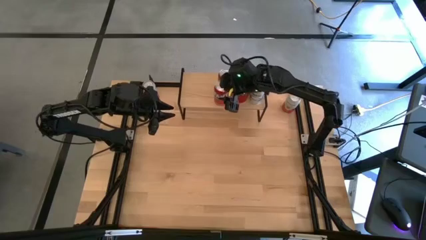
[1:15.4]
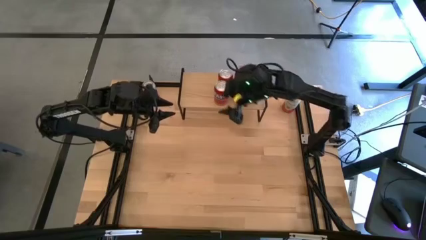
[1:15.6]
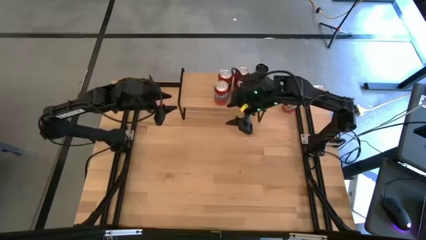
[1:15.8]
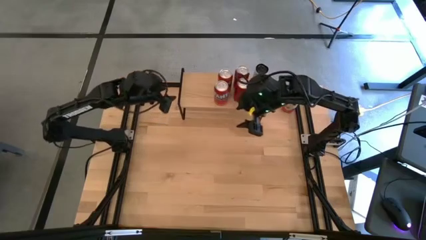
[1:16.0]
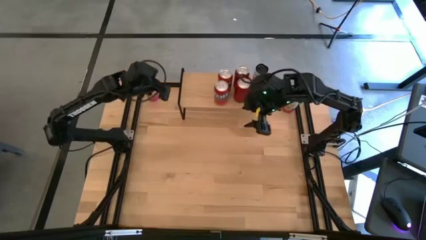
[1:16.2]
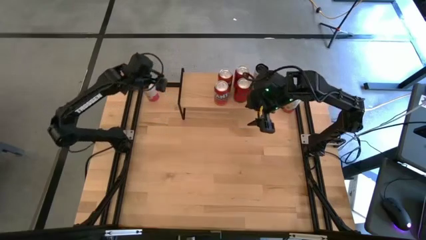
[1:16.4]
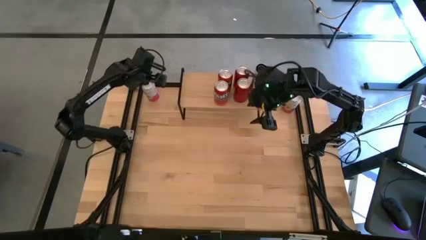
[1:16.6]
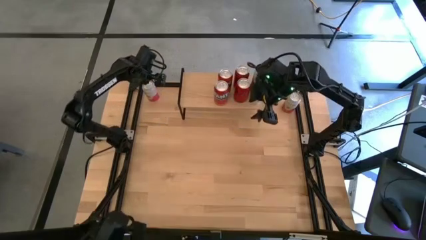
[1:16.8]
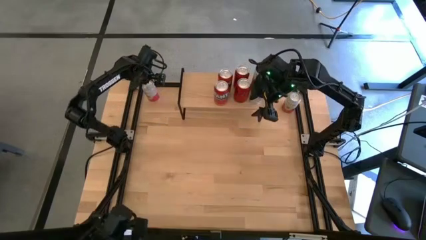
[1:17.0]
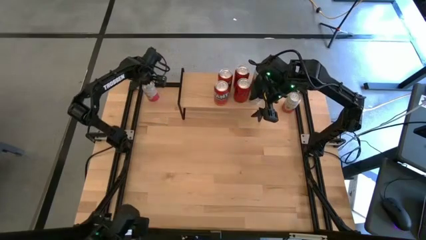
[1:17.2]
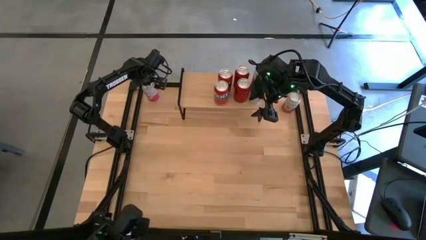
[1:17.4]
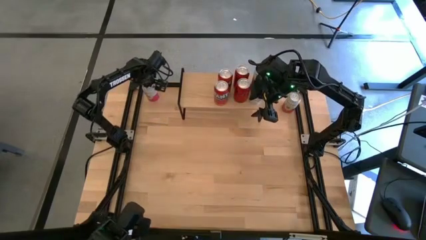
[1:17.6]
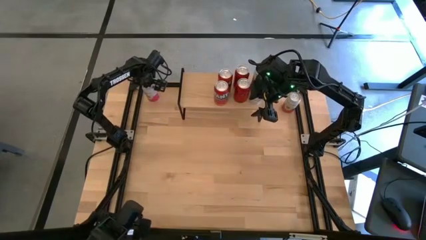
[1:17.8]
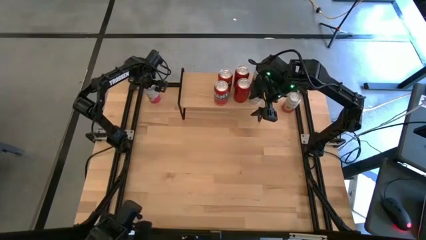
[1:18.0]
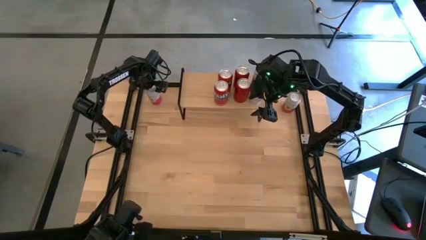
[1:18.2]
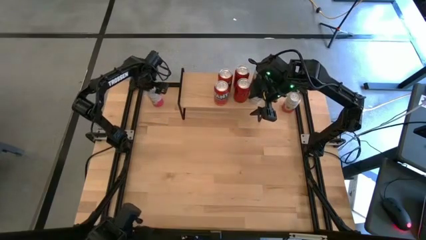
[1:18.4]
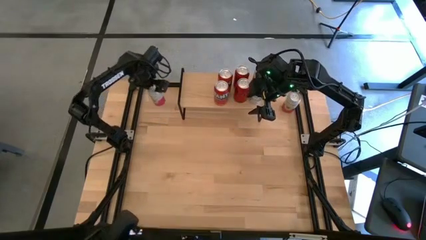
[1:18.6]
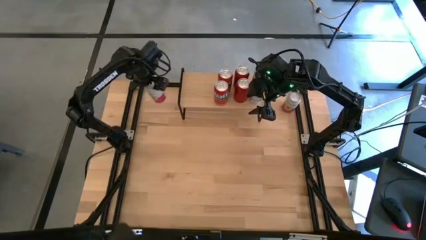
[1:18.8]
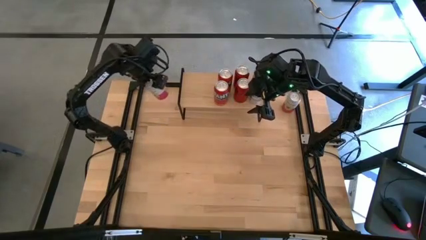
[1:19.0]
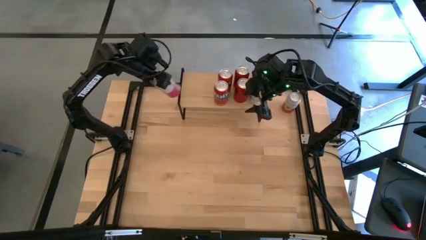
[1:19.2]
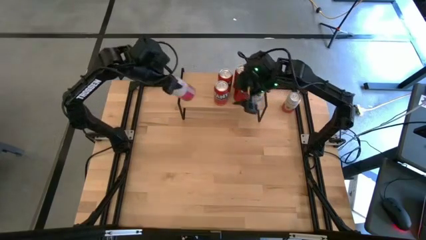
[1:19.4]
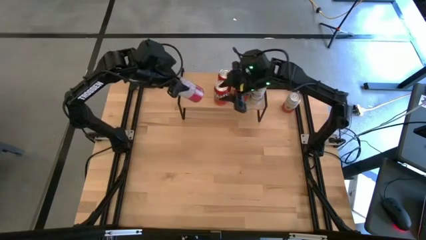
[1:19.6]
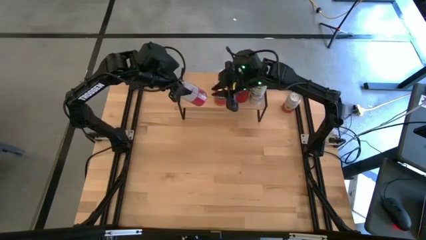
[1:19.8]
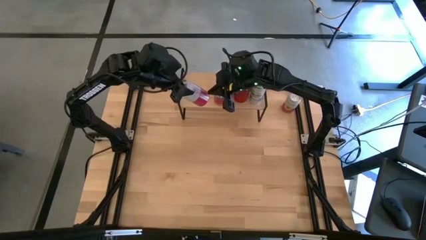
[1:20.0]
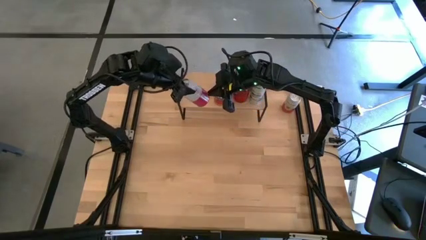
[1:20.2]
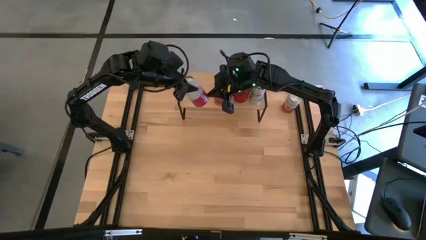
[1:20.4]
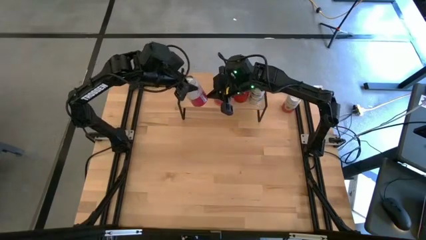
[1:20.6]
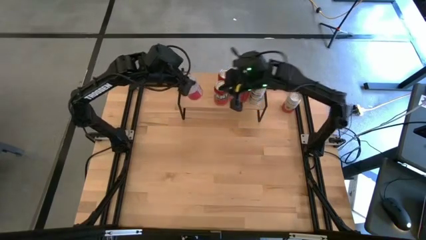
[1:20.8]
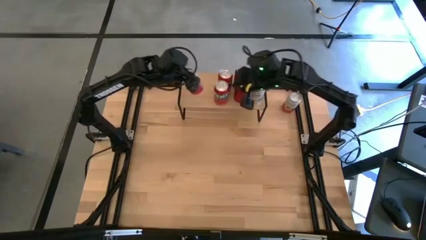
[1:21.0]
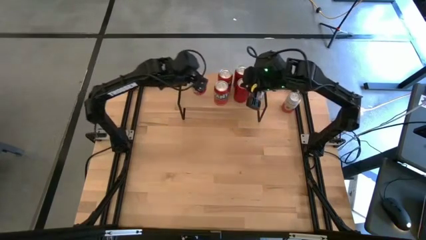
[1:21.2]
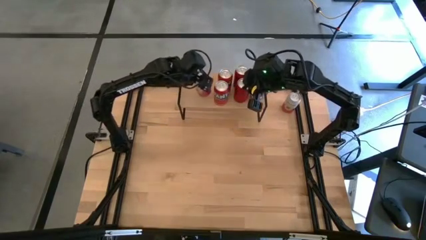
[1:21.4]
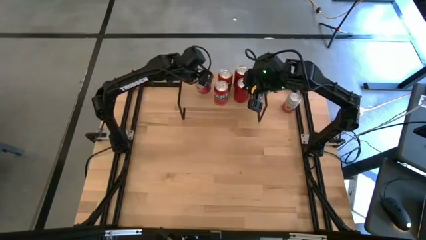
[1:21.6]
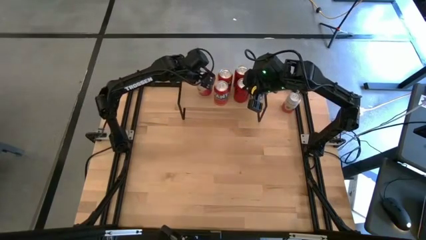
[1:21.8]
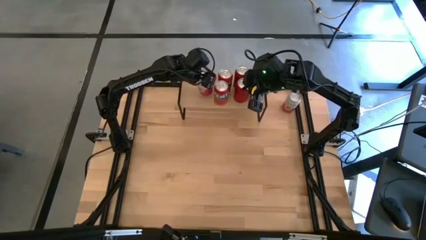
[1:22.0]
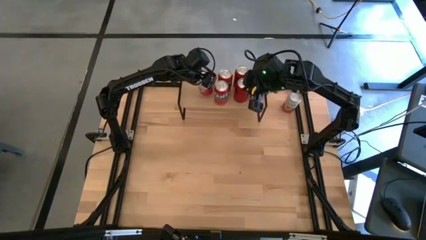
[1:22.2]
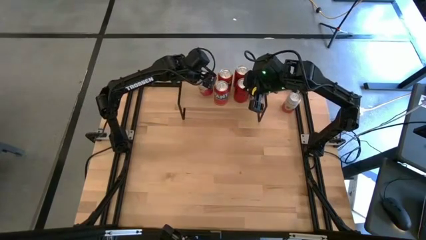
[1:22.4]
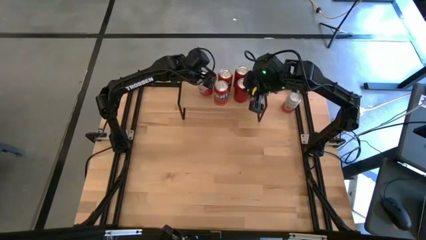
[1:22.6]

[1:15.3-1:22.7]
Task: Place canned beverage on shelf
Put the left pink-white soda can on the shelf

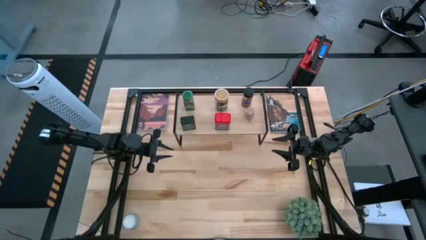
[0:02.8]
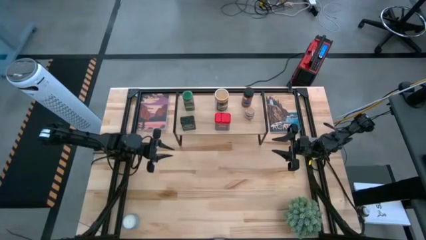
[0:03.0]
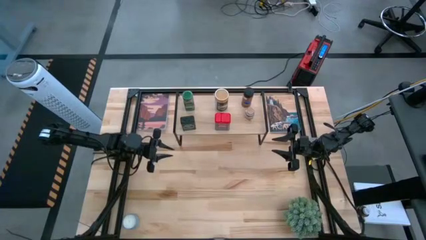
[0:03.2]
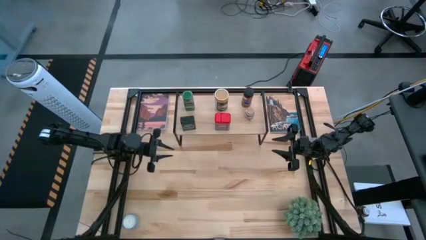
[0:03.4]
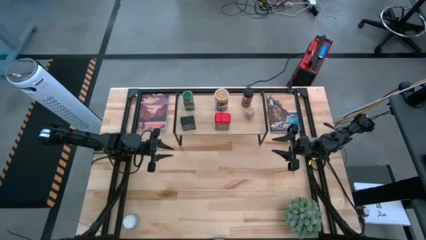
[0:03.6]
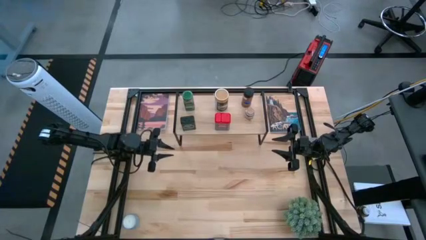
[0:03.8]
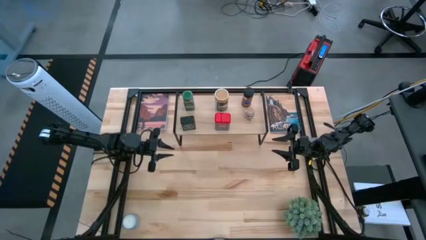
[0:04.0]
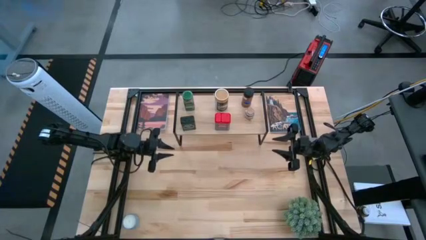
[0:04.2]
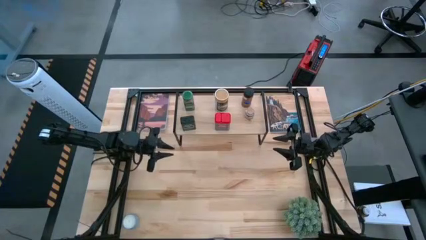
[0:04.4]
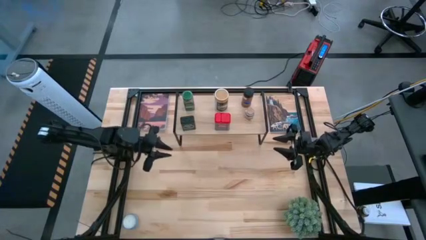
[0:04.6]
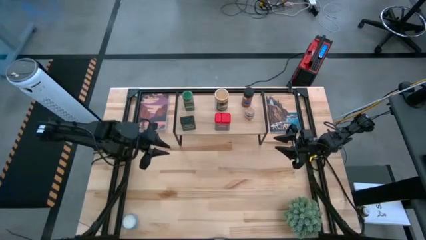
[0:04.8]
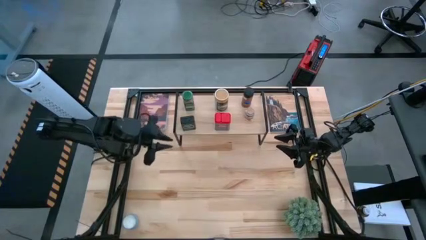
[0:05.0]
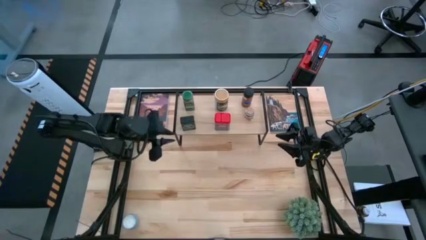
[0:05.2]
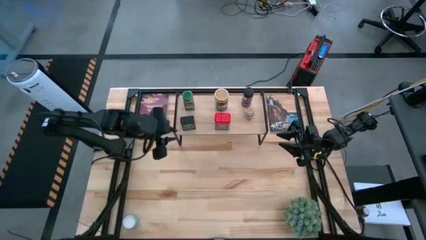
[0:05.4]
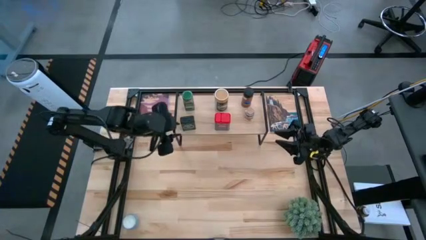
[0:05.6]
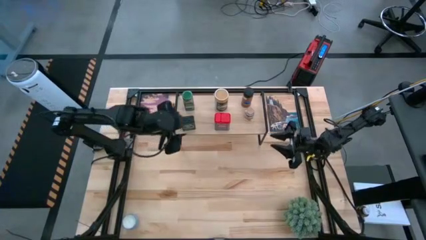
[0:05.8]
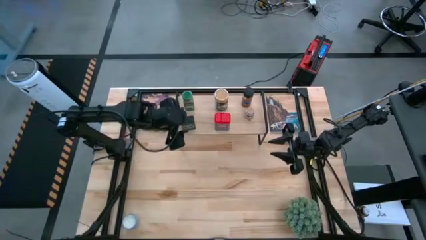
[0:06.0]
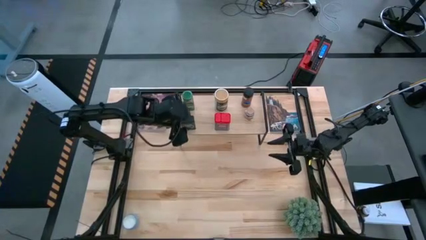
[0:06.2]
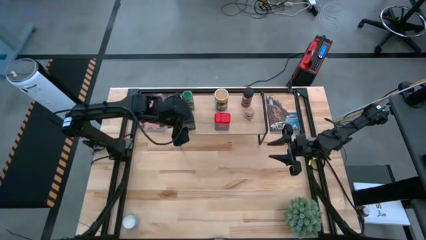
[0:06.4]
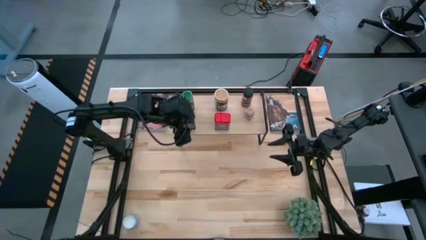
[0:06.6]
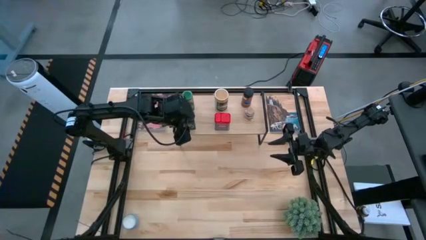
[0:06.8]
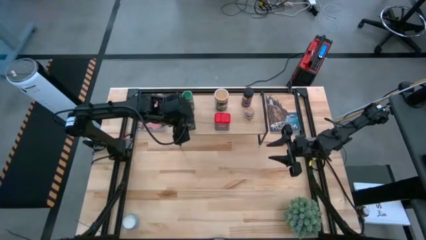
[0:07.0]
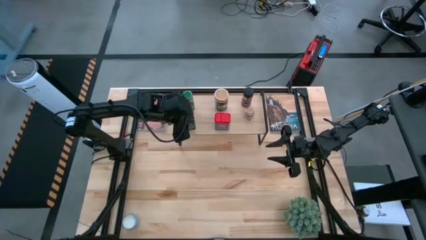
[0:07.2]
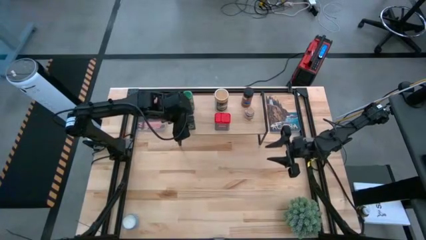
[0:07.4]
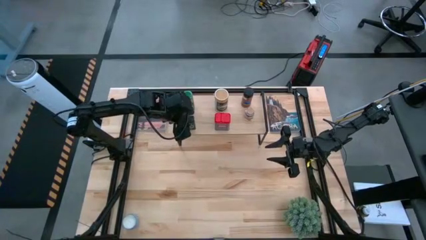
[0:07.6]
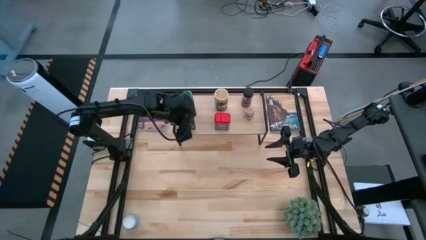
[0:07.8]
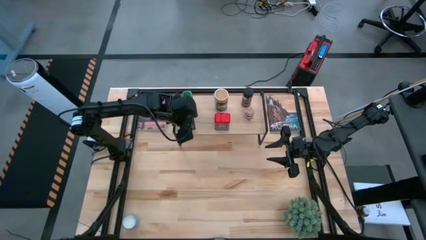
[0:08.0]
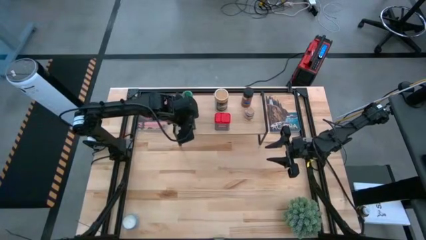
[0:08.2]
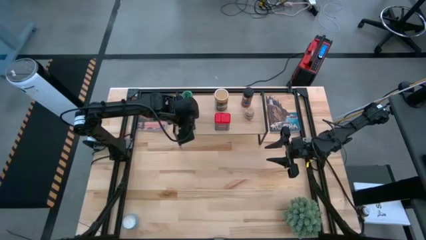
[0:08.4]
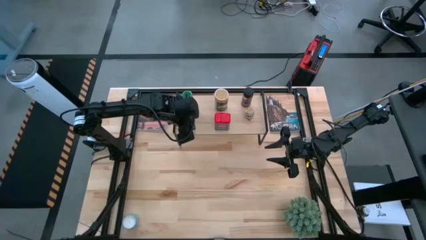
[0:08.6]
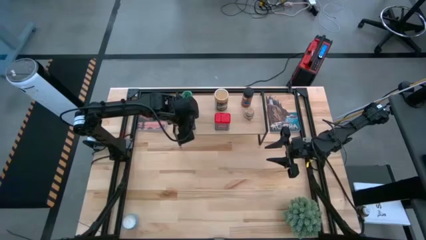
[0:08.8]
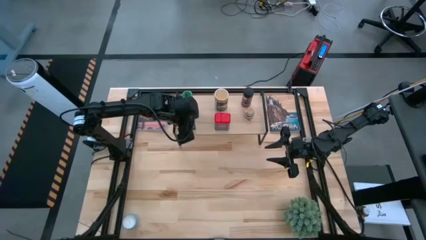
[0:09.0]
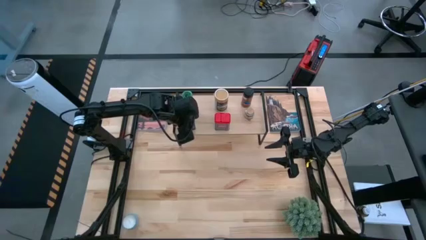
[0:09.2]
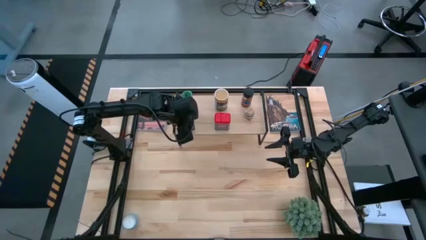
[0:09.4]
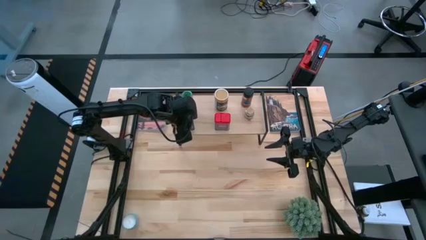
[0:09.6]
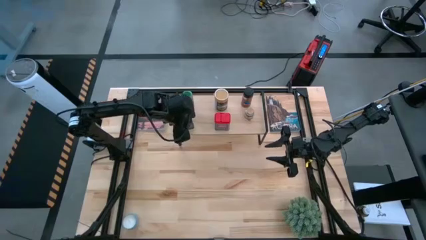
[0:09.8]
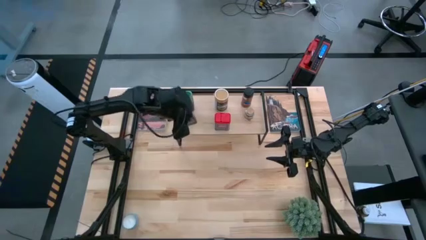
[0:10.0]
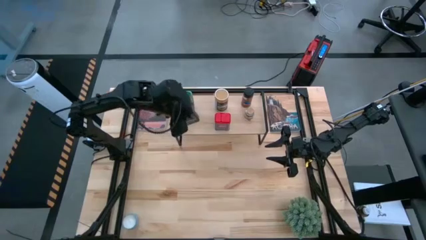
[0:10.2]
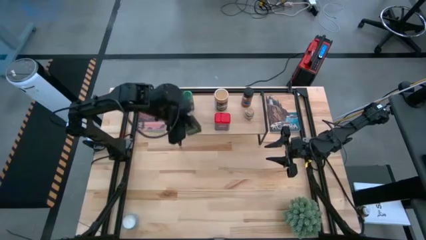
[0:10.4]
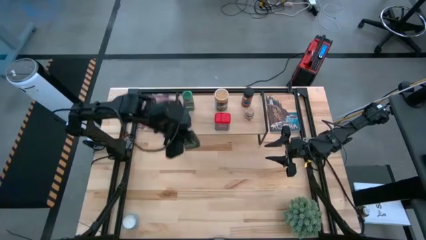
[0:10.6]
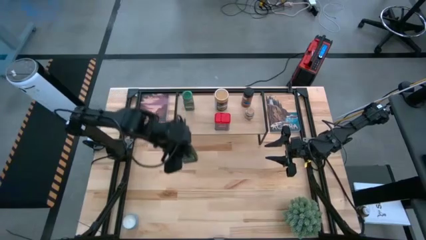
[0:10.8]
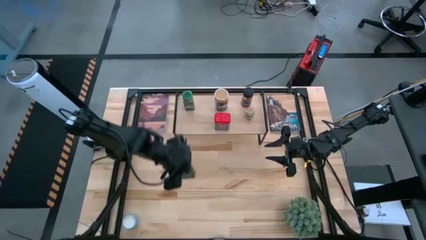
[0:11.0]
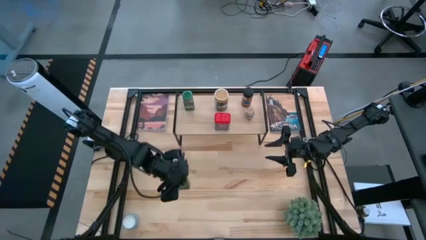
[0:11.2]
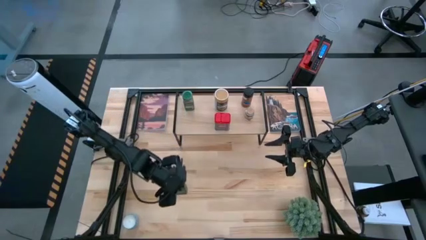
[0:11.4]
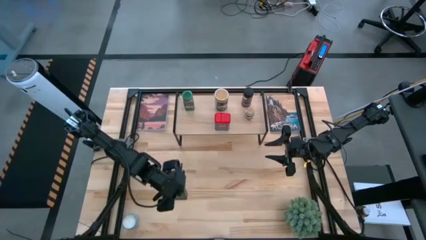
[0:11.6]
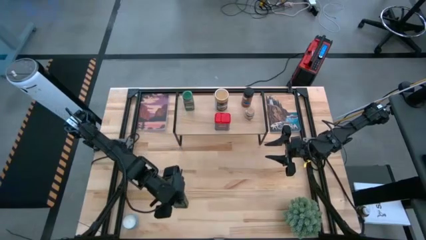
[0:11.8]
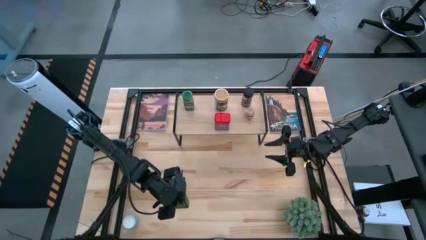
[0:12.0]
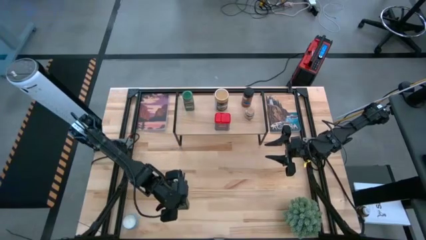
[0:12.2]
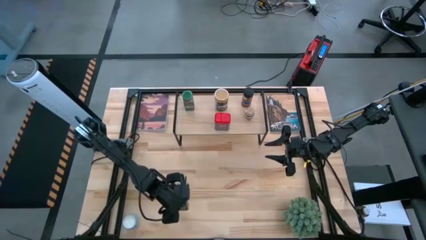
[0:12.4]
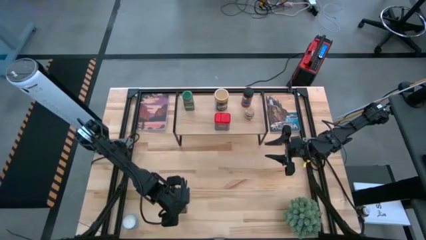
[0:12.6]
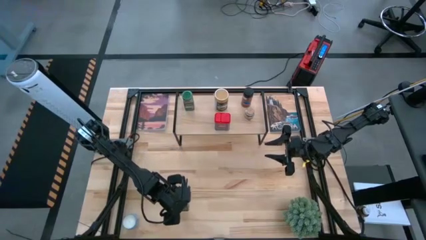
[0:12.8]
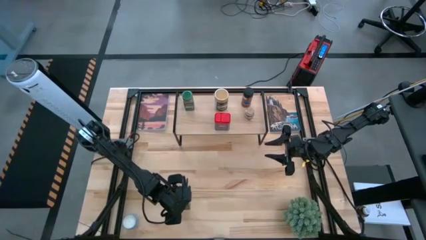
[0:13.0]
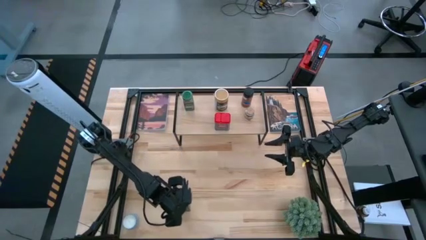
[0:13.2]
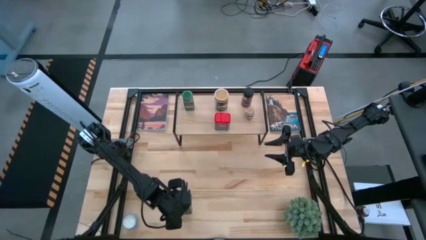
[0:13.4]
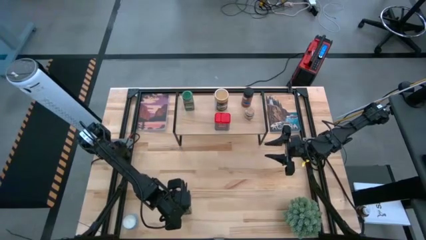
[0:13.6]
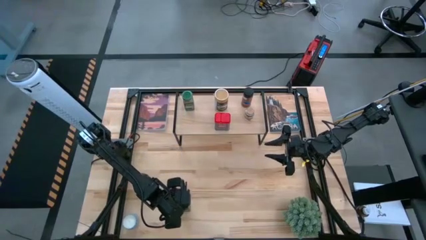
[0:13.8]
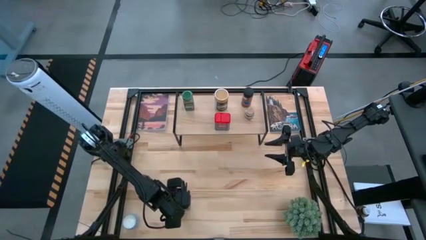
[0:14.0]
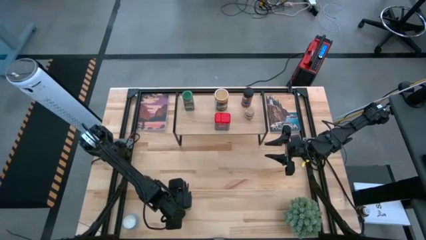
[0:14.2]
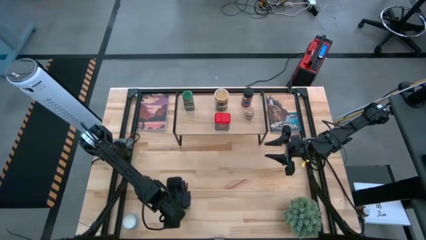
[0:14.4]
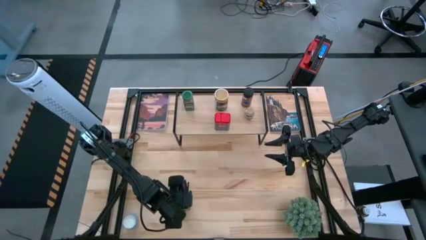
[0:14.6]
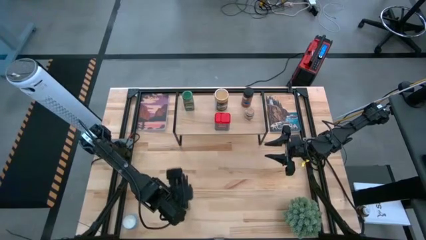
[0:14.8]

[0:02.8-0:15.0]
Task: Shelf spices
Remove the black seasoning can from the shelf
